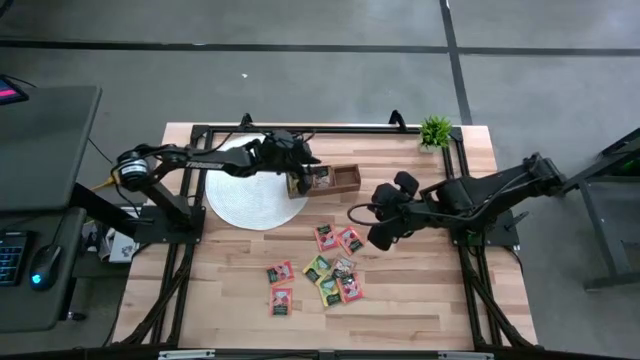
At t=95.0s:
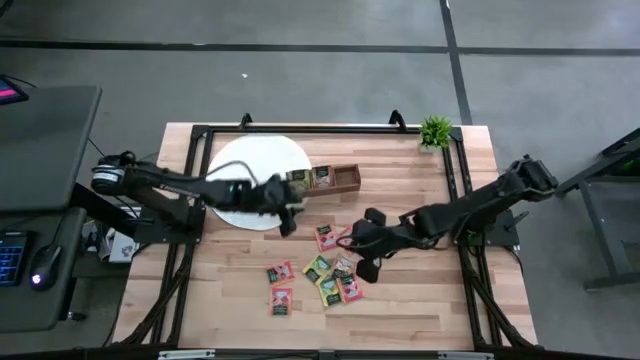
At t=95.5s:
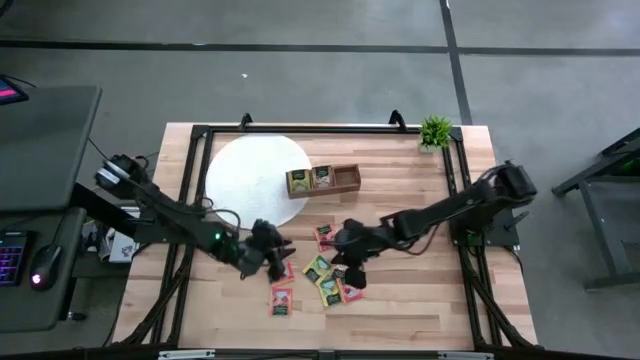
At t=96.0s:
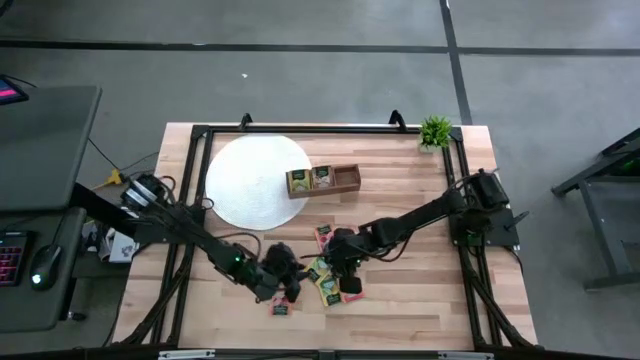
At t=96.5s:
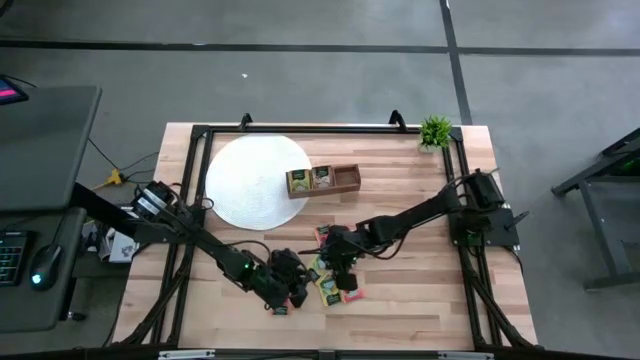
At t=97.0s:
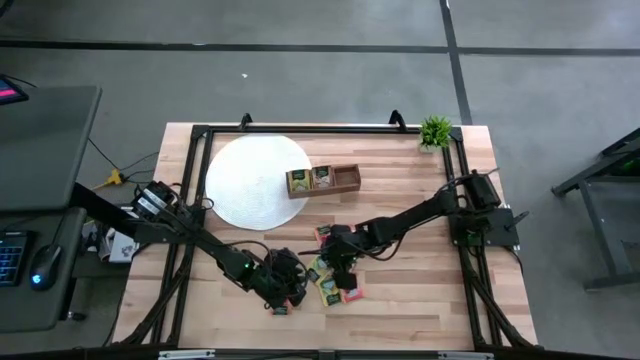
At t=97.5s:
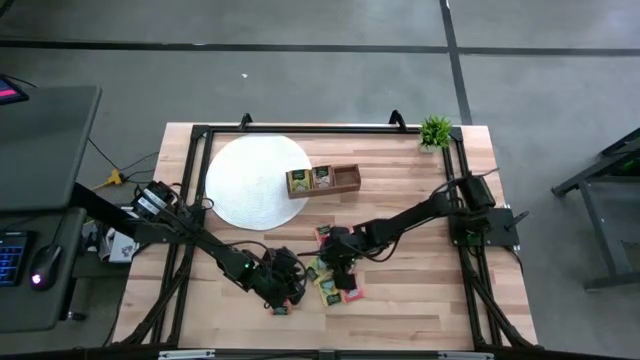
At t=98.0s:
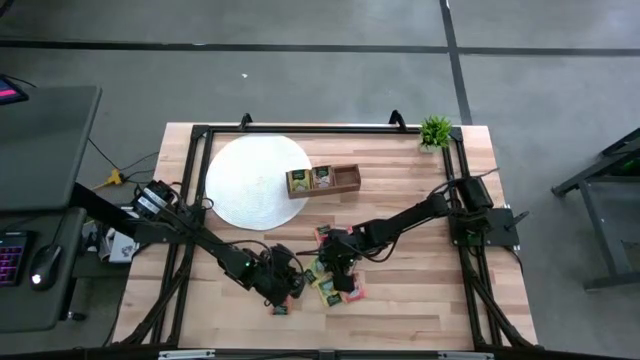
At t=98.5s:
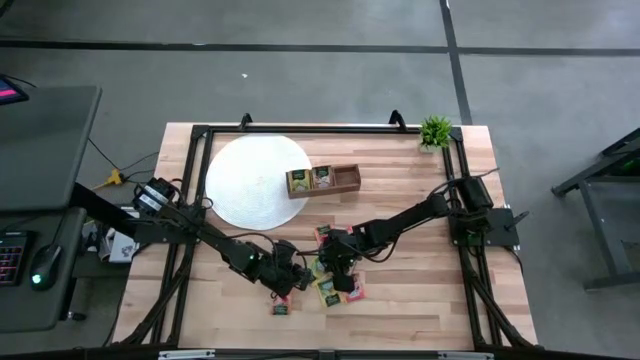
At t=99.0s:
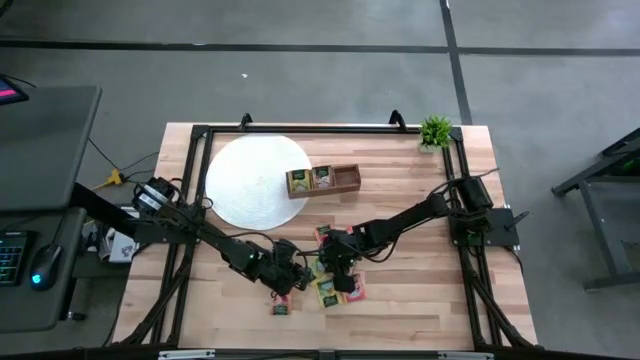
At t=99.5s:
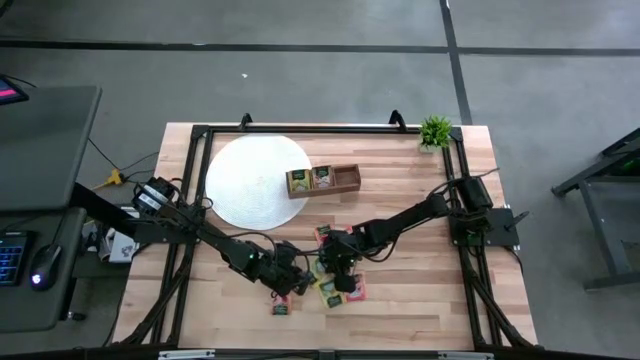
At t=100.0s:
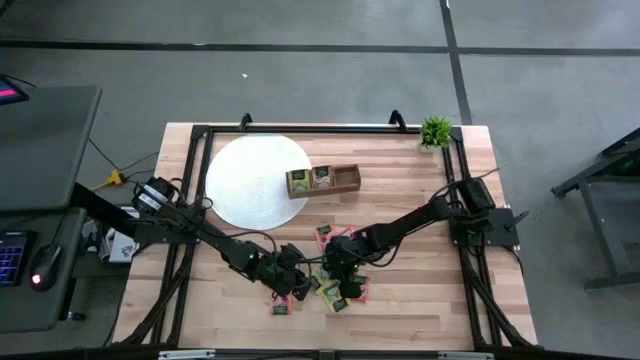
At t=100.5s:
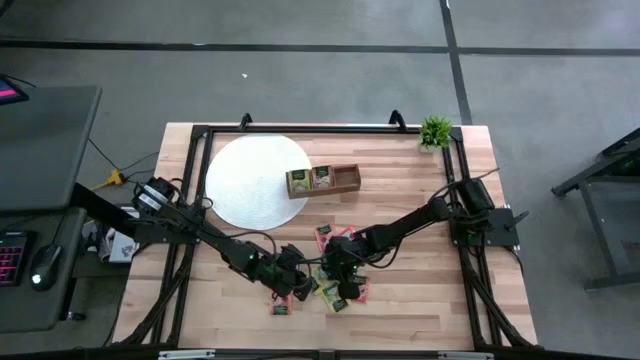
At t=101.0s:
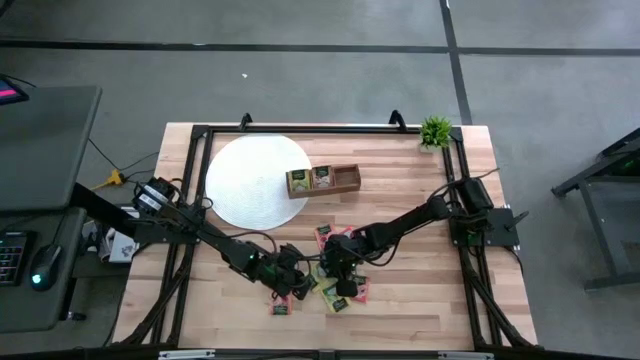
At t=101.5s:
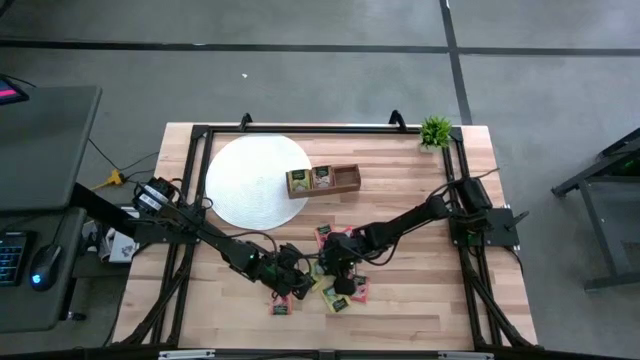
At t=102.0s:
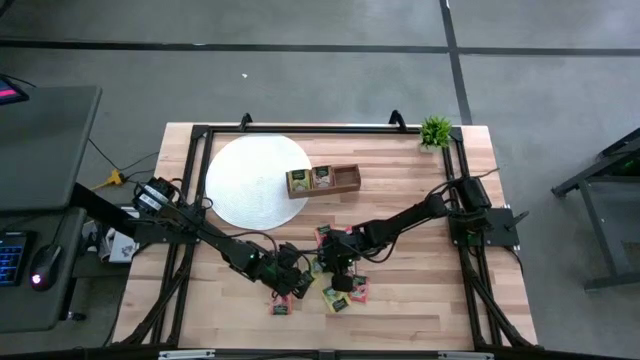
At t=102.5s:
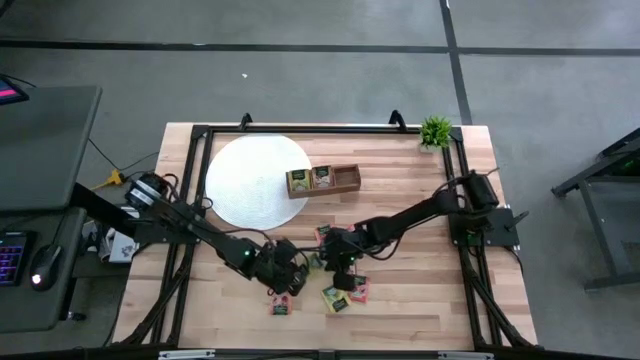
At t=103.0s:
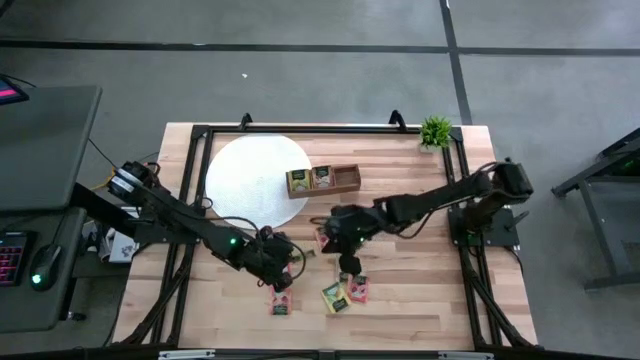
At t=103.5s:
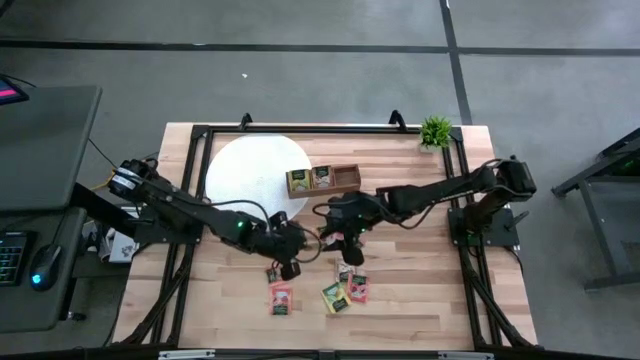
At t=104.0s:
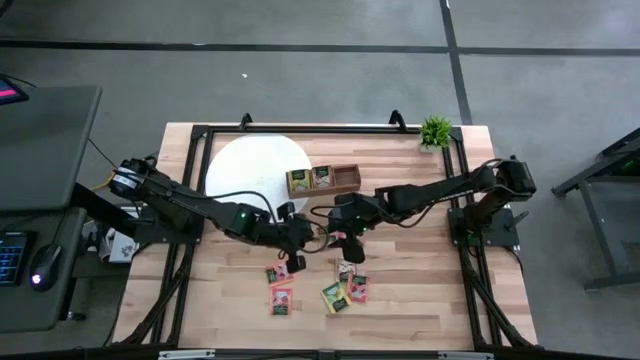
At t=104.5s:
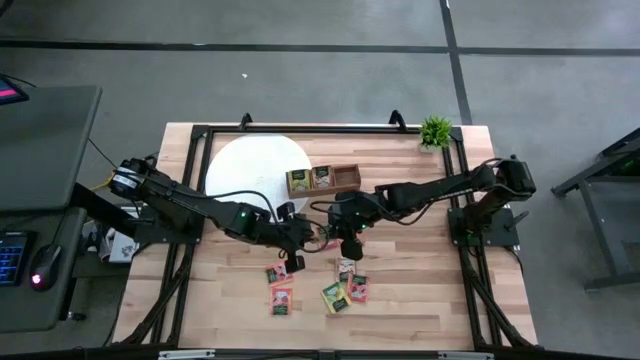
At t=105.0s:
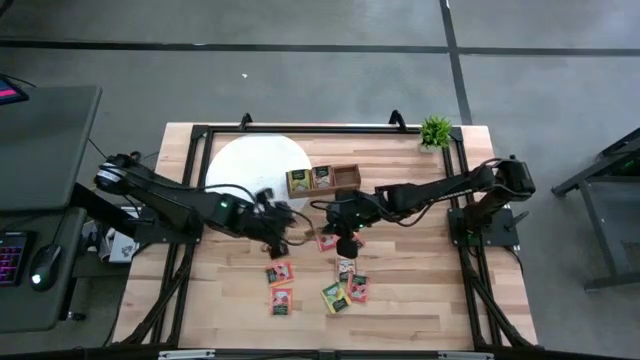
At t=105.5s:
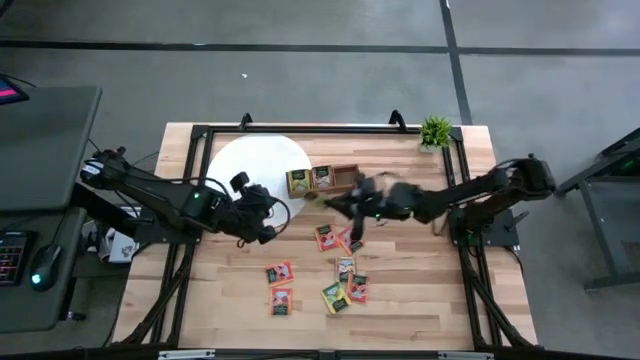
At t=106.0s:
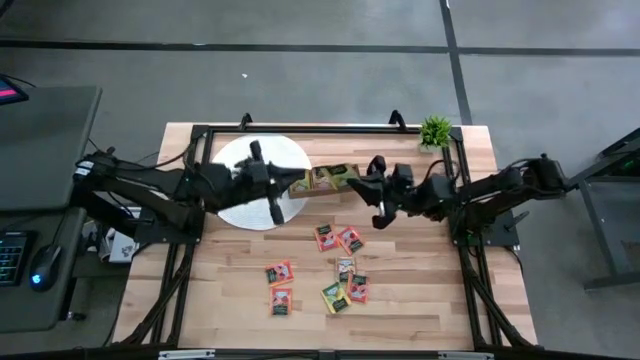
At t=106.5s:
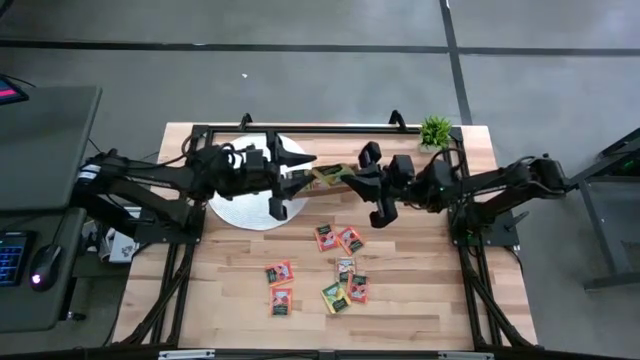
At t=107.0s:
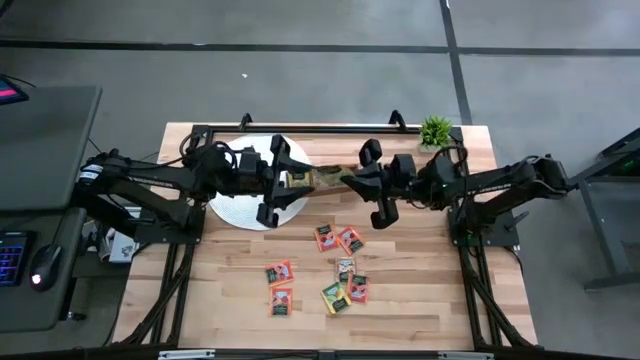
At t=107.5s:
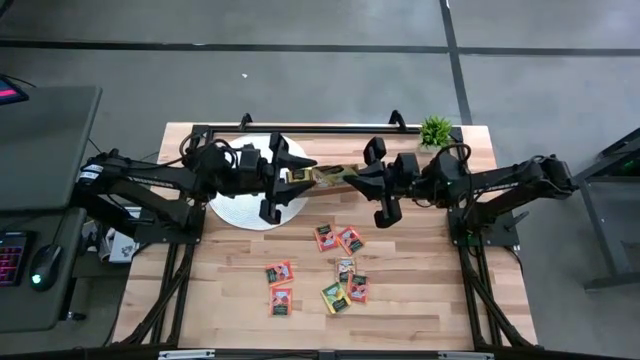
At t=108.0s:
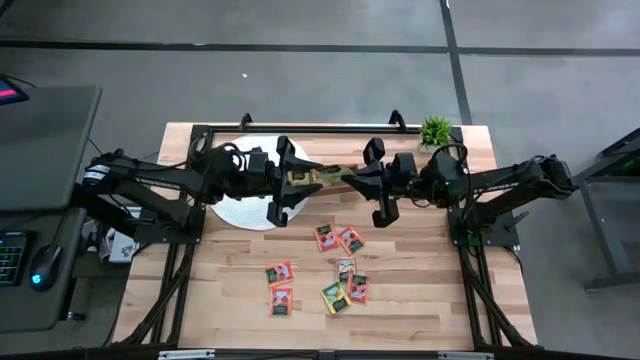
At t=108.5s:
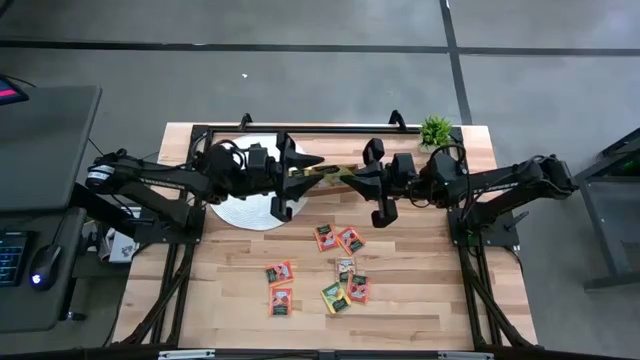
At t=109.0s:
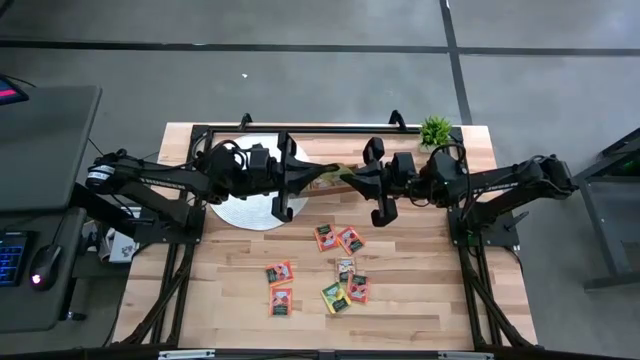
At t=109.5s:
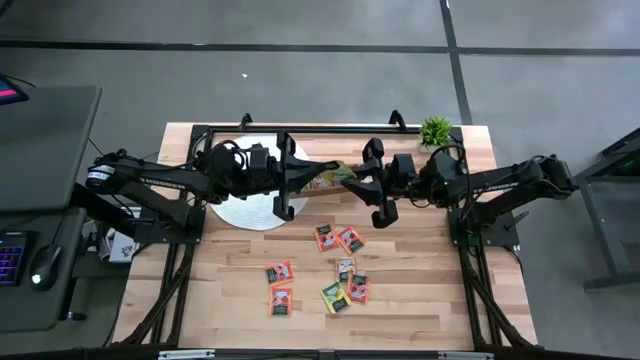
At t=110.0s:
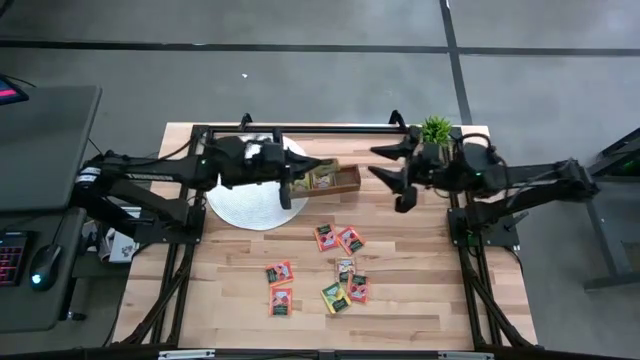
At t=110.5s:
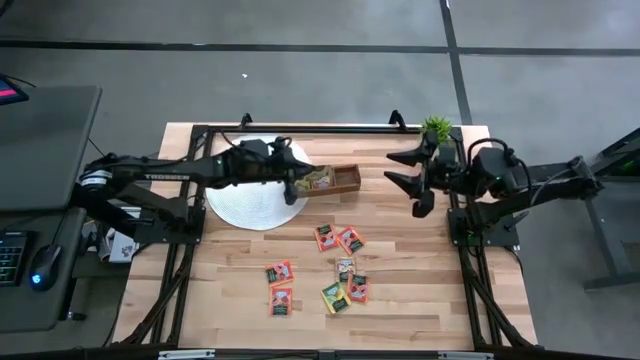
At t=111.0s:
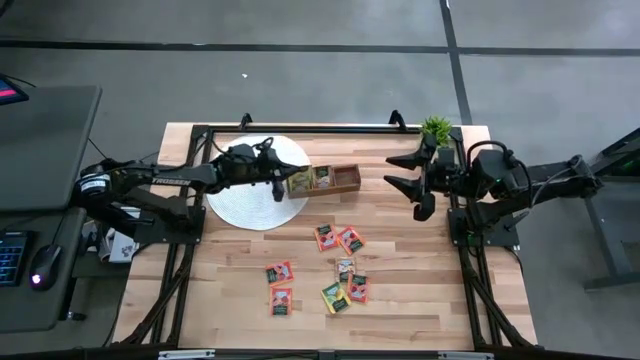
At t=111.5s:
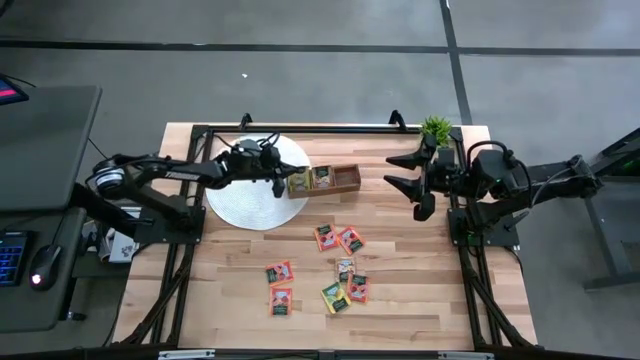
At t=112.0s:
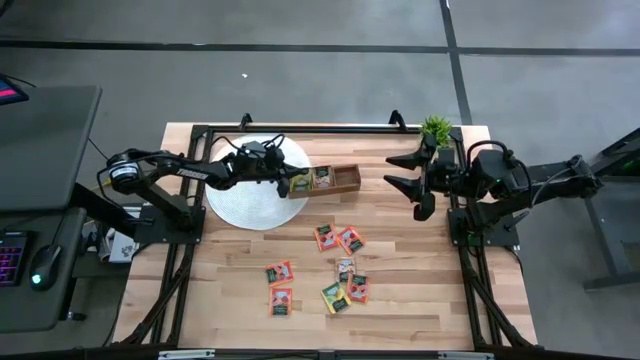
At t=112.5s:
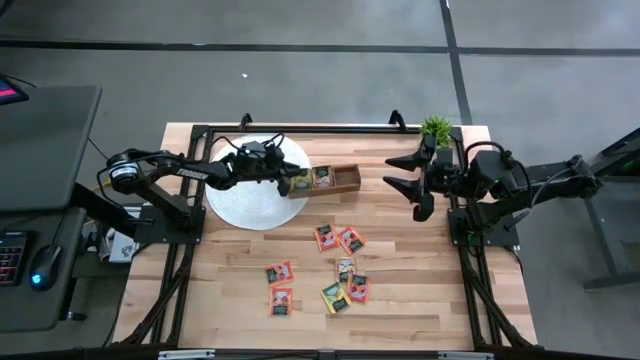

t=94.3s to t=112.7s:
Task: Pick & Place Tea
Put the yellow tea bag into the left compartment of the wooden organizer
